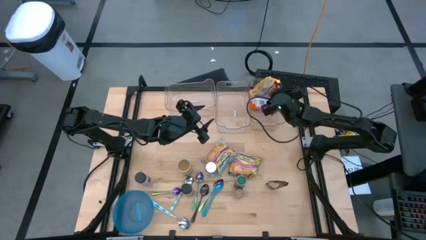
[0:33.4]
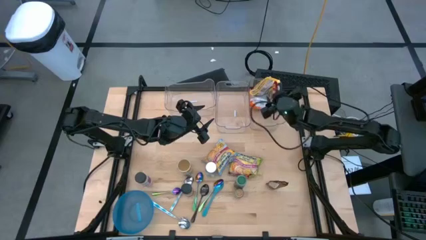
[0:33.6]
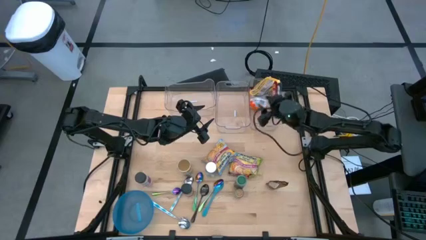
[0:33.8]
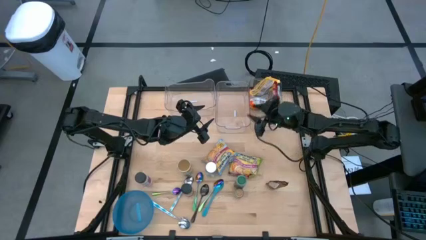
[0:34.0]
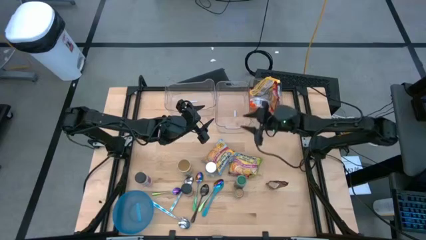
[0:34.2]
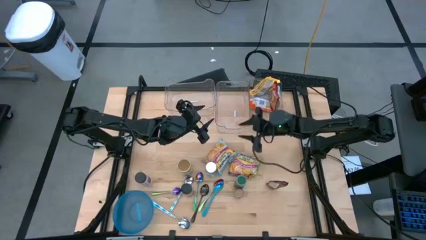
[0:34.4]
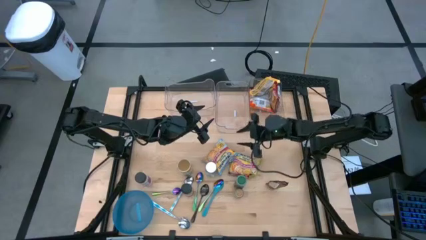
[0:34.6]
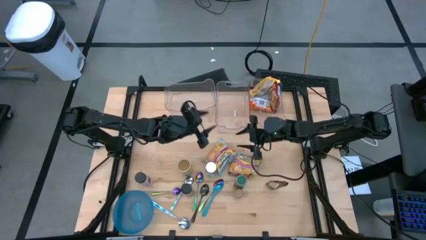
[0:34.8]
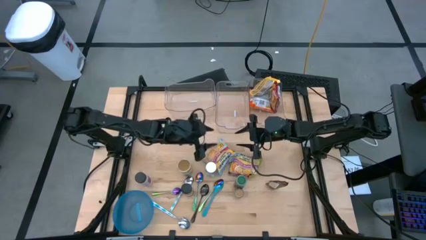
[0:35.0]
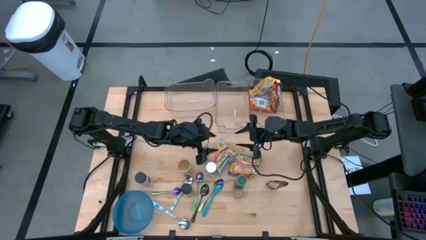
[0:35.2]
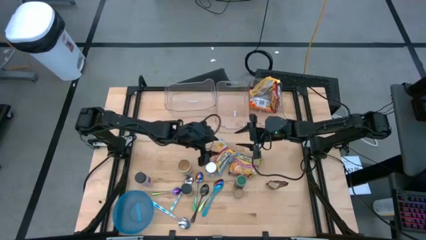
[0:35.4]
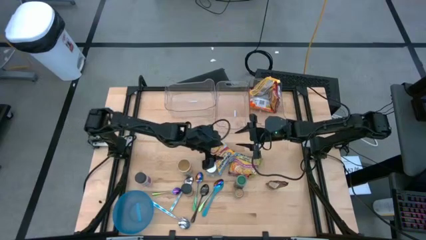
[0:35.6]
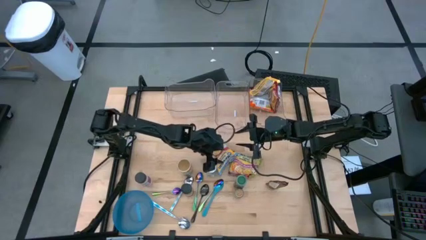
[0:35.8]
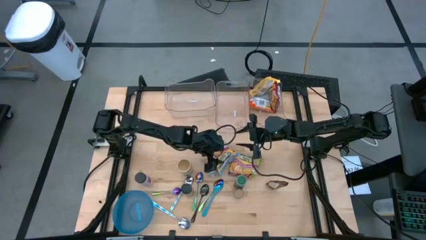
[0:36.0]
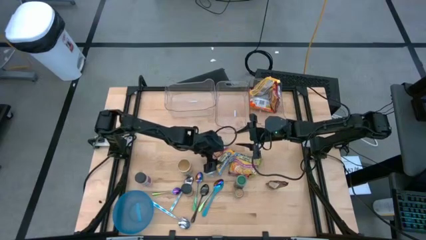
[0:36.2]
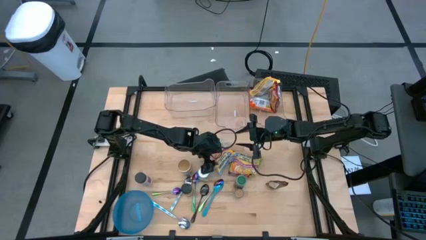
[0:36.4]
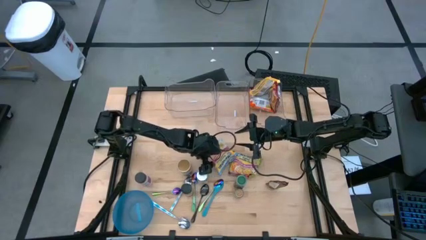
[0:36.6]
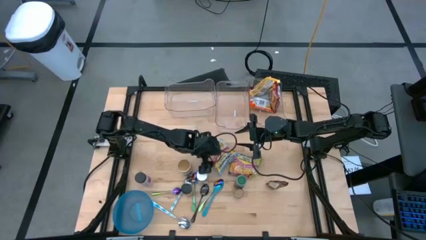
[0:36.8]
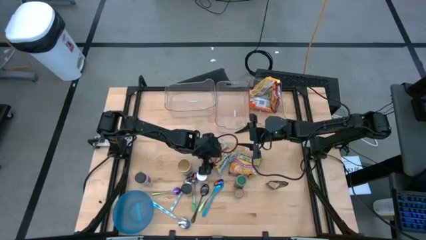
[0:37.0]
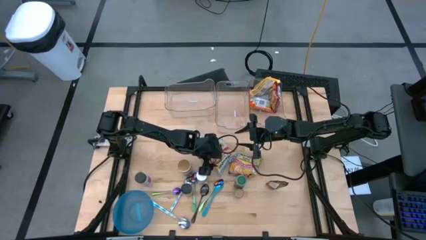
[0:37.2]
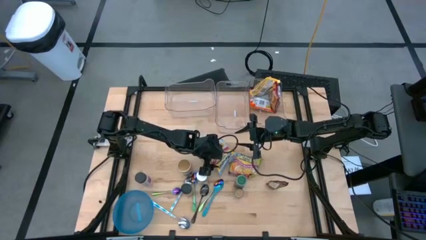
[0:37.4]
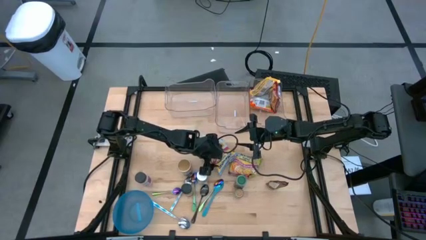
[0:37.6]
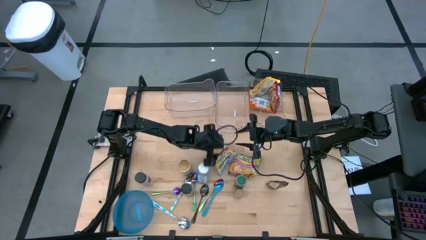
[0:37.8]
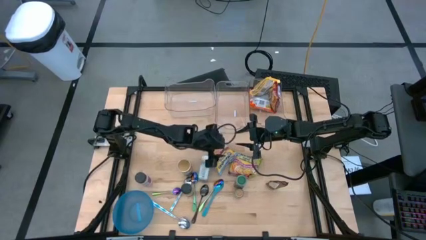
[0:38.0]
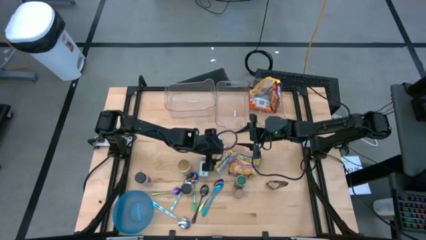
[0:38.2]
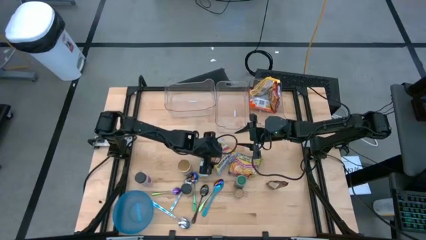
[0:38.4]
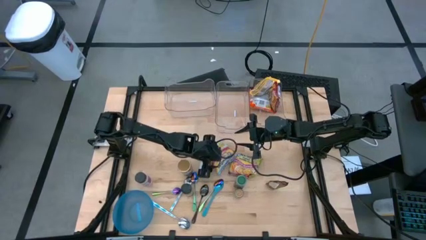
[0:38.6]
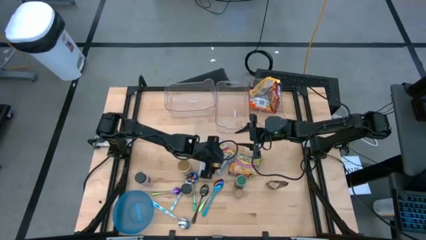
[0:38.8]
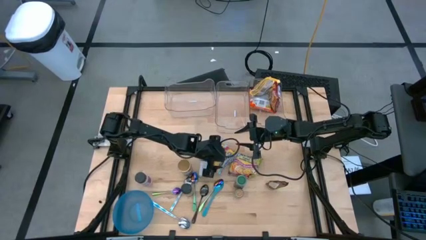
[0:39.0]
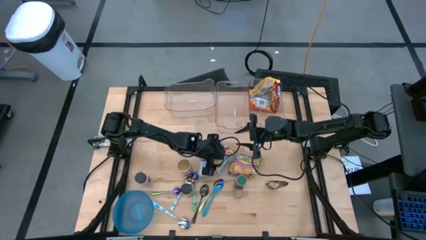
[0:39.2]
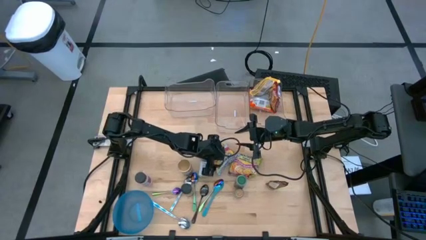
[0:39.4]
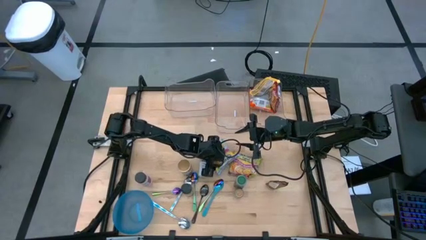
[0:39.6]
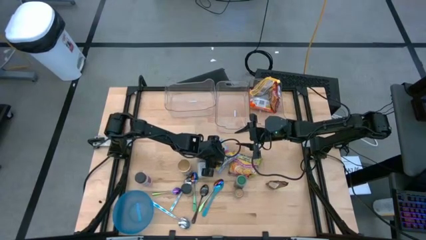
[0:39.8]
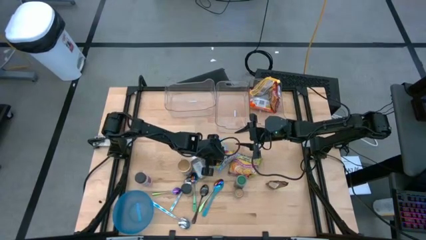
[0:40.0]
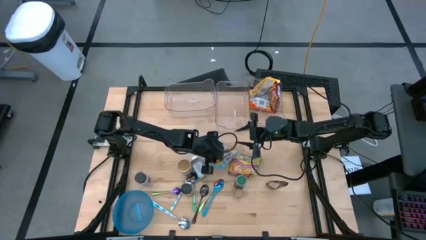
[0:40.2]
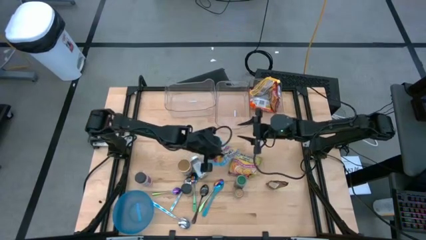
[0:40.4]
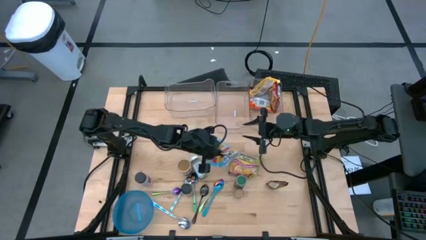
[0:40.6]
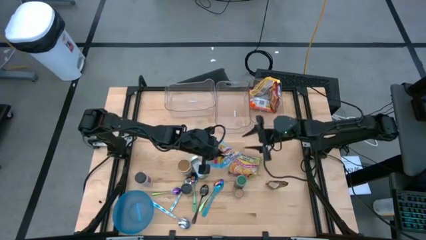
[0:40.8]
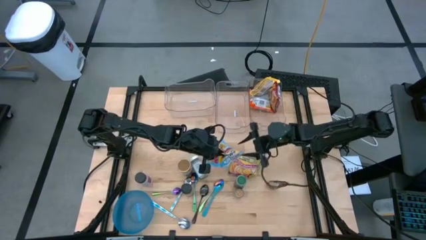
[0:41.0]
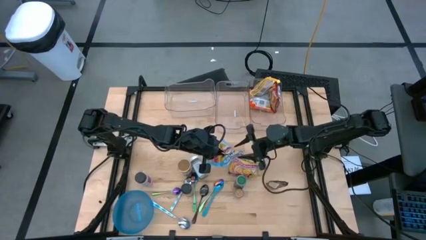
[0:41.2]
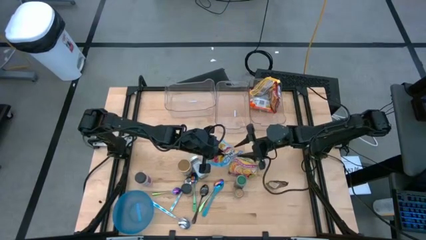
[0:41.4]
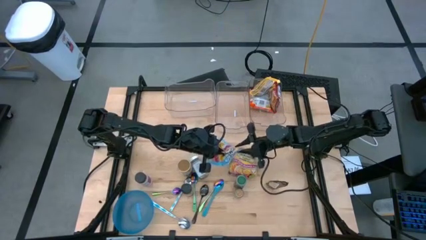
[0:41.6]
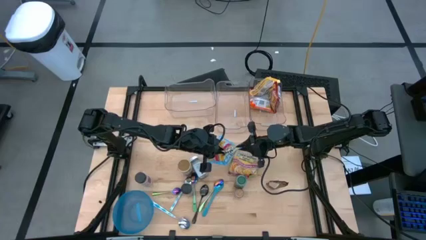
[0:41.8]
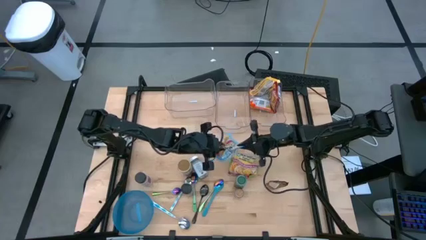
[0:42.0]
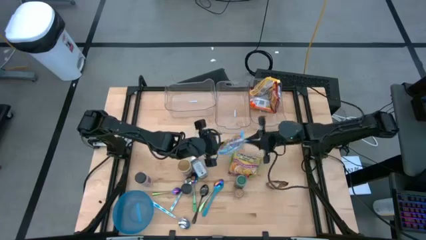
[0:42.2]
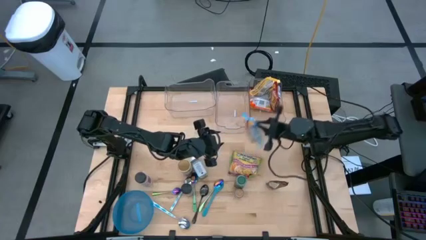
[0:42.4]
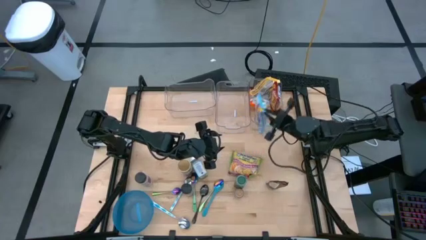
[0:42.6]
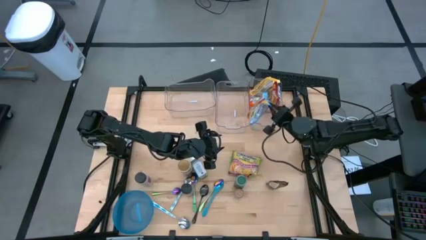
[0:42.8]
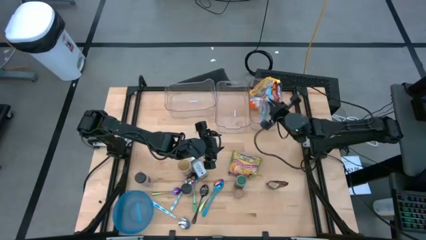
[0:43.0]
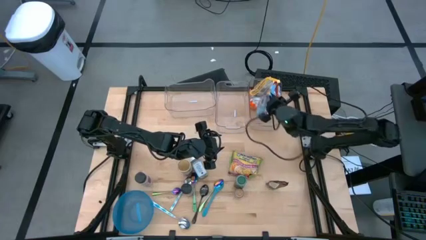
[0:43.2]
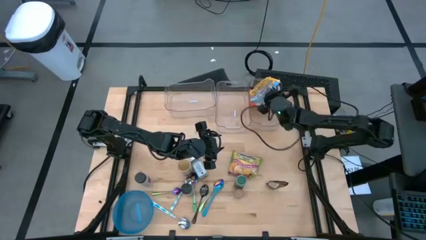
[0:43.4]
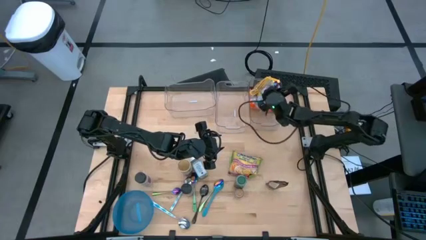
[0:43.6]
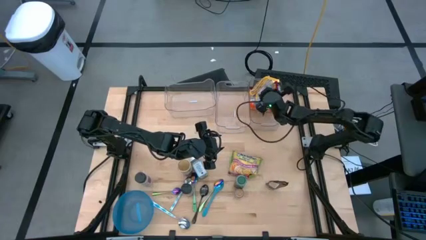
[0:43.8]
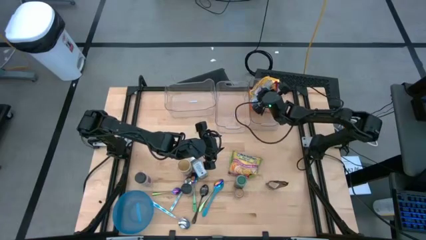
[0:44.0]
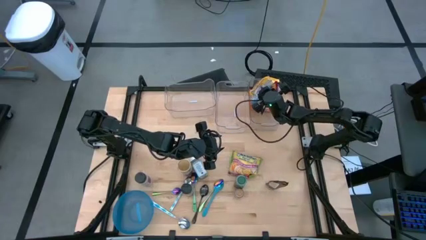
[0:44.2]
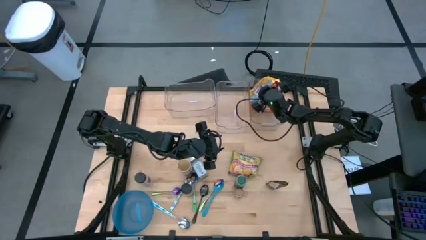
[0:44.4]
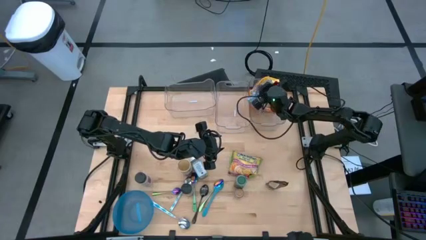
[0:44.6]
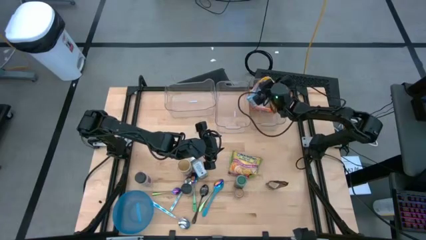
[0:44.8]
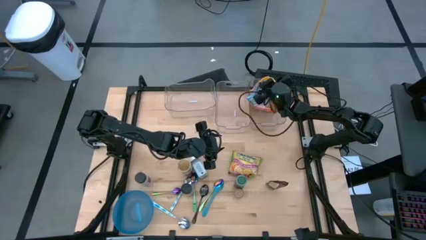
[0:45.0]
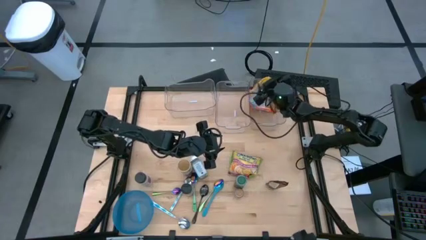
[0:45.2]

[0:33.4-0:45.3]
Task: Pick & Place Food Item
Put the blue noodle pack into the right transparent bin

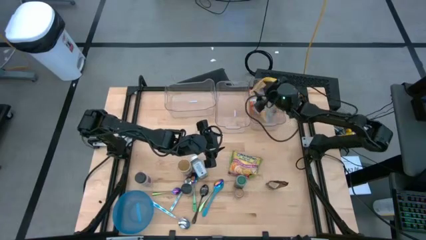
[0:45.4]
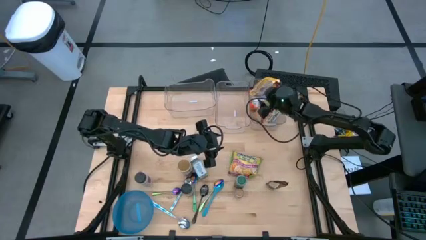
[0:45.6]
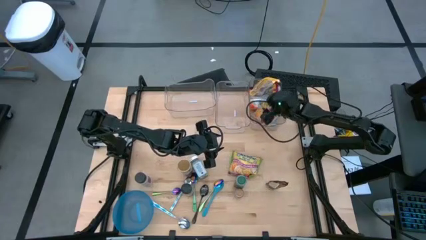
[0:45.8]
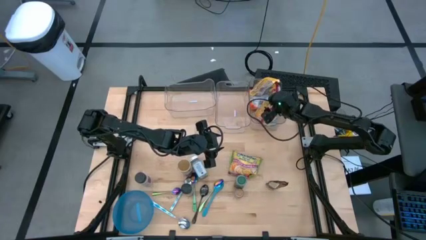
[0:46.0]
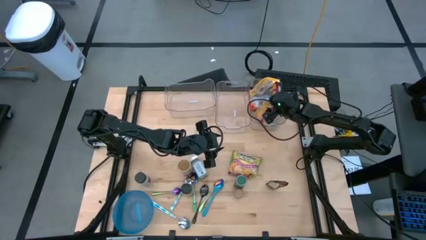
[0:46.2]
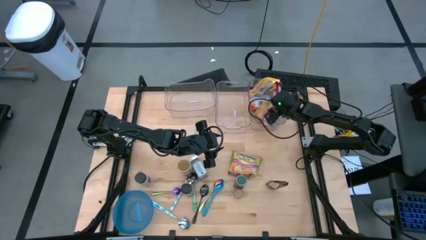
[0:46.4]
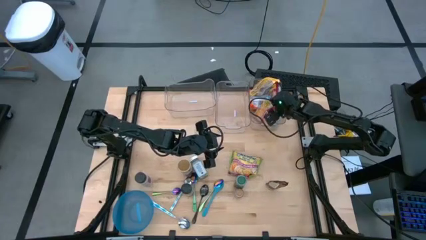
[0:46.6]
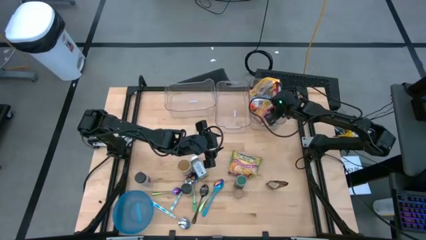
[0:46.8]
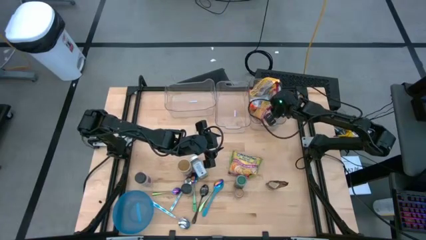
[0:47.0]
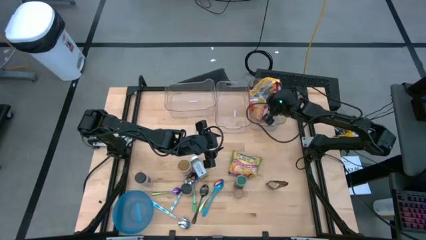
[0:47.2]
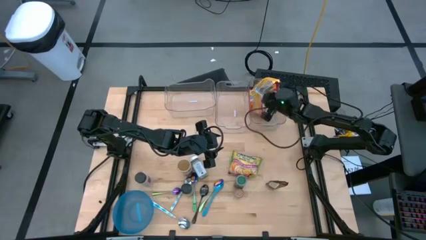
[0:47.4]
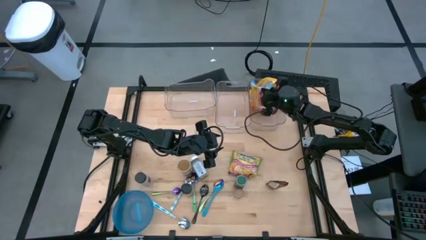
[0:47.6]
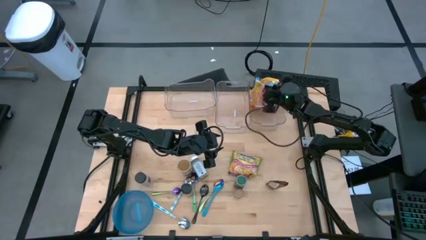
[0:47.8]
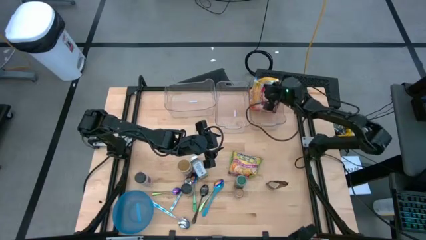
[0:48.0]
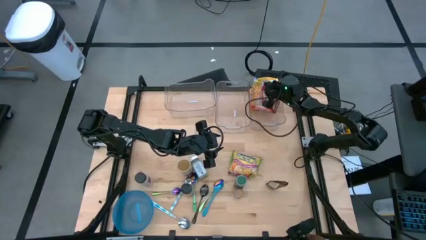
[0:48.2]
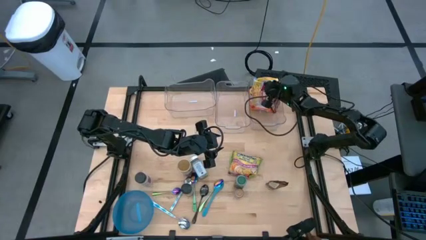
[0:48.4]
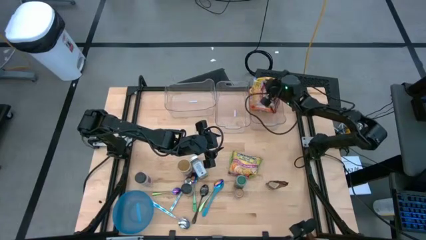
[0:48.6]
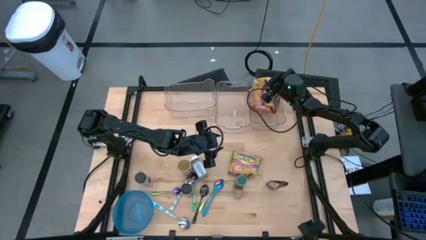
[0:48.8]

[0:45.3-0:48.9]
Adjust the blue noodle pack in the right transparent bin

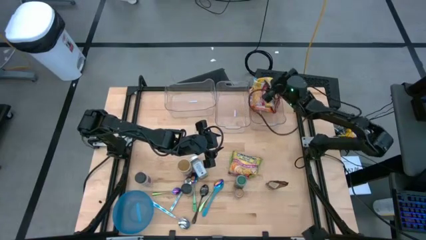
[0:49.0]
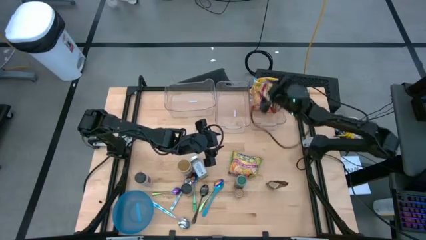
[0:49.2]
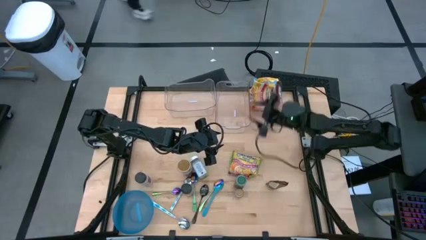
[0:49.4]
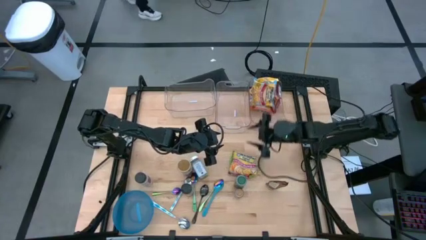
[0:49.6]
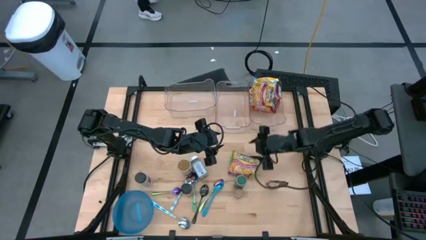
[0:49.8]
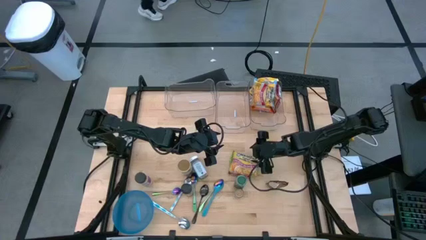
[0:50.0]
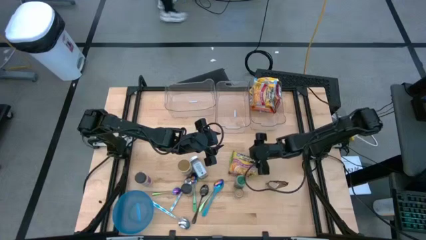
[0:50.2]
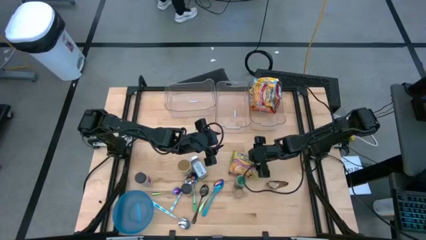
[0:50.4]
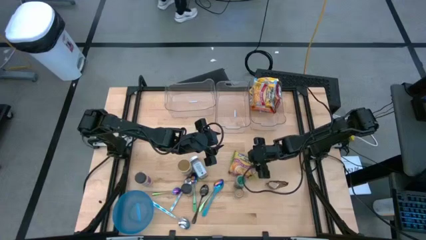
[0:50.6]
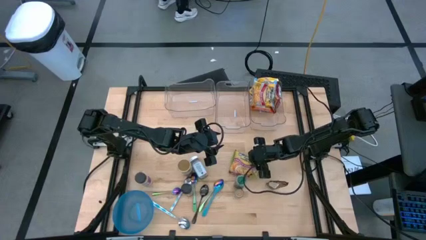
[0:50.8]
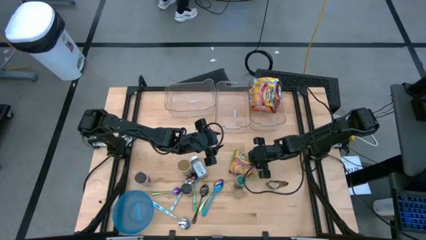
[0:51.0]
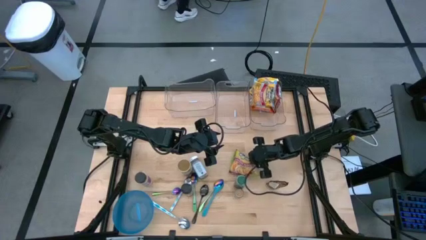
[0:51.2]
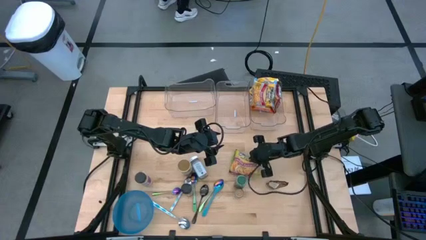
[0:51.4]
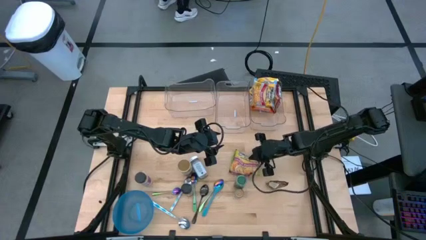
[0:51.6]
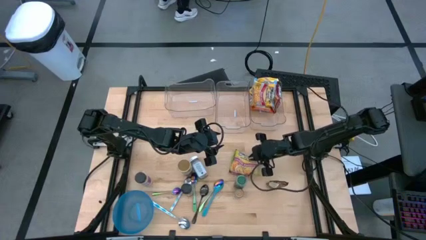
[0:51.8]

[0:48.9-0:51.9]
Put the green noodle pack into the right transparent bin
